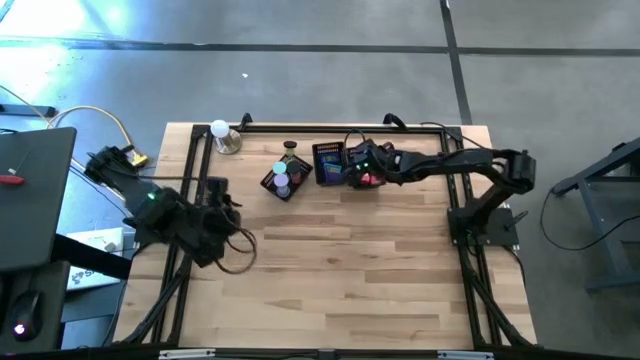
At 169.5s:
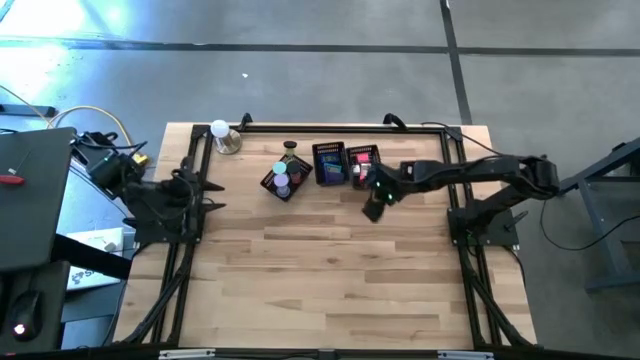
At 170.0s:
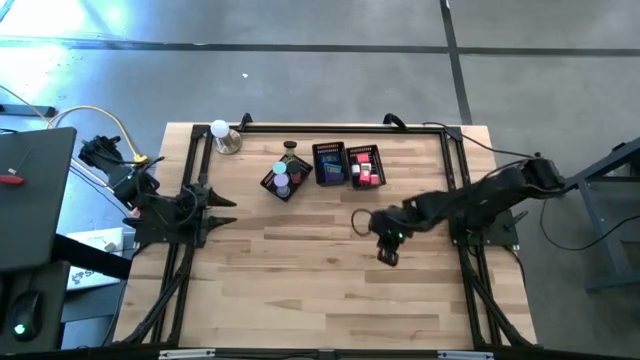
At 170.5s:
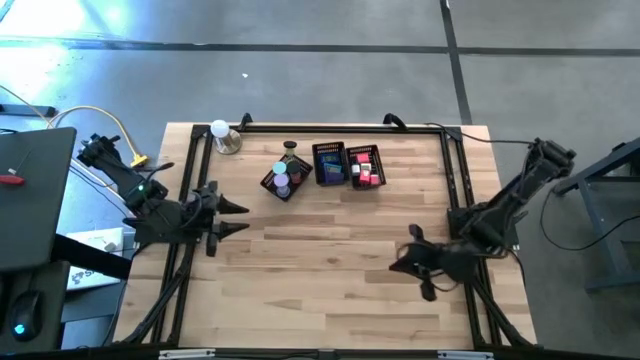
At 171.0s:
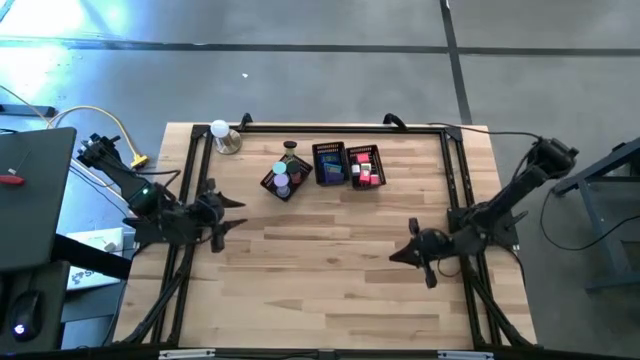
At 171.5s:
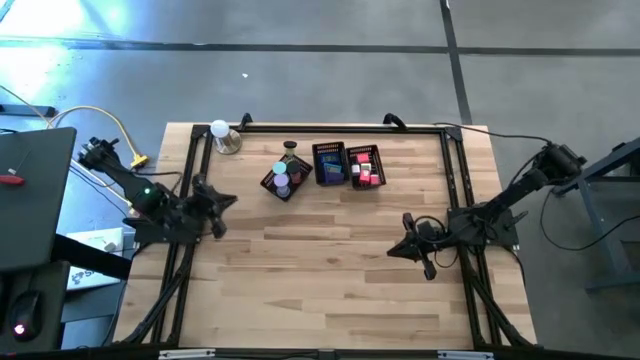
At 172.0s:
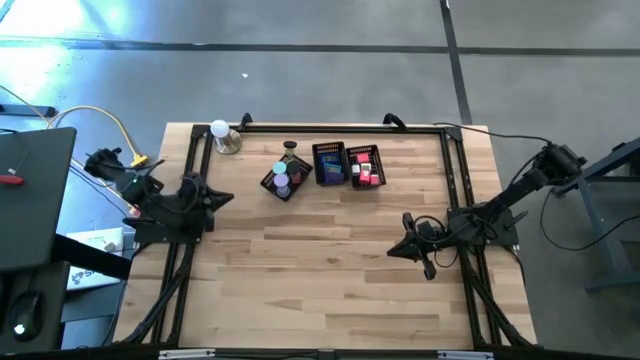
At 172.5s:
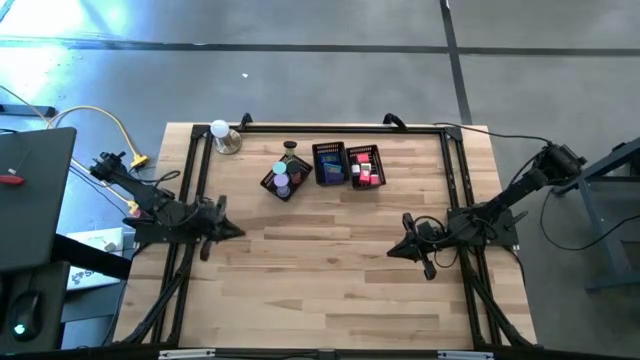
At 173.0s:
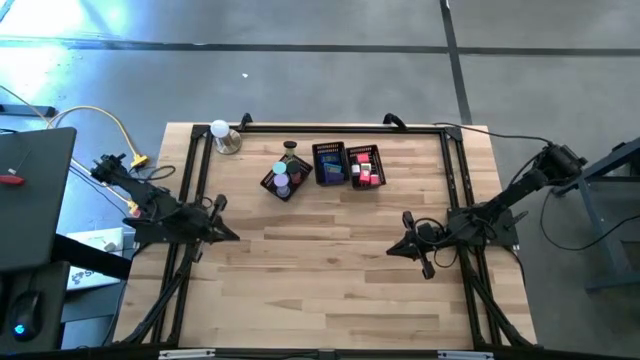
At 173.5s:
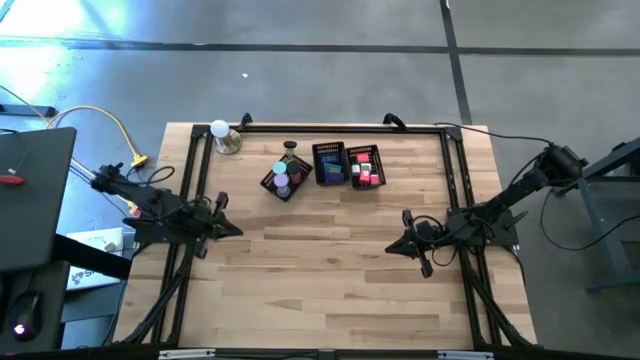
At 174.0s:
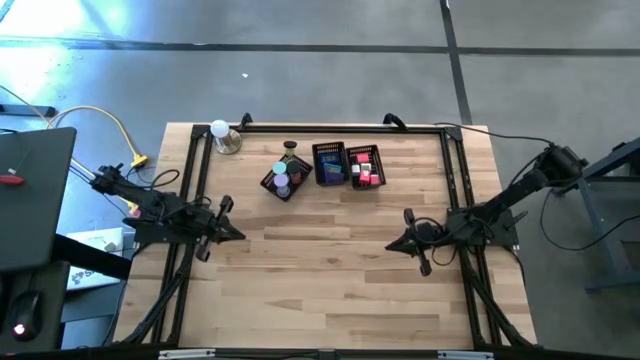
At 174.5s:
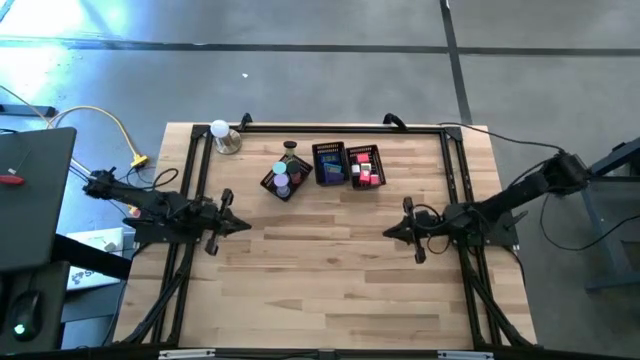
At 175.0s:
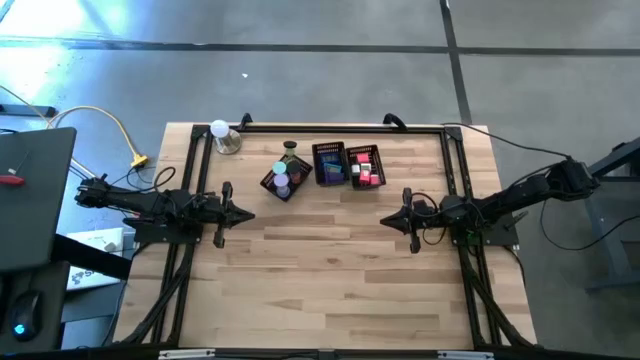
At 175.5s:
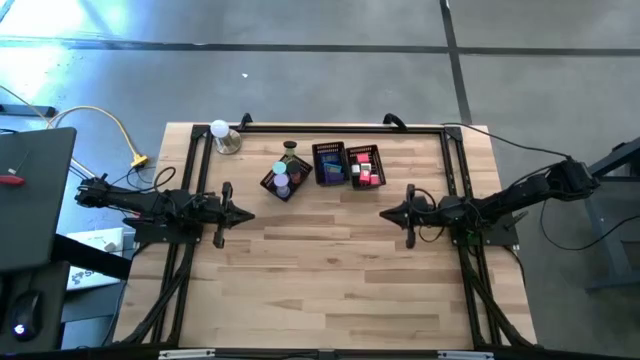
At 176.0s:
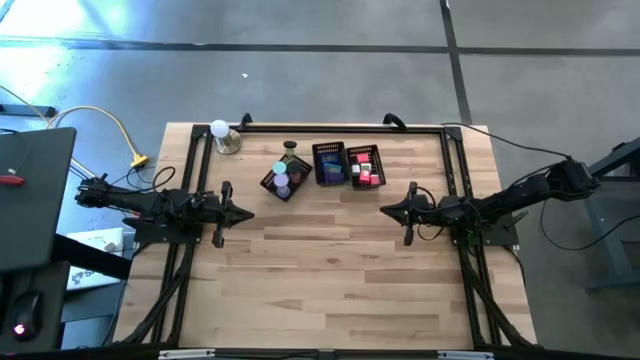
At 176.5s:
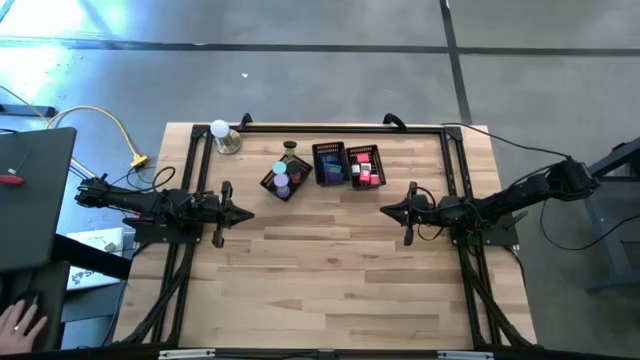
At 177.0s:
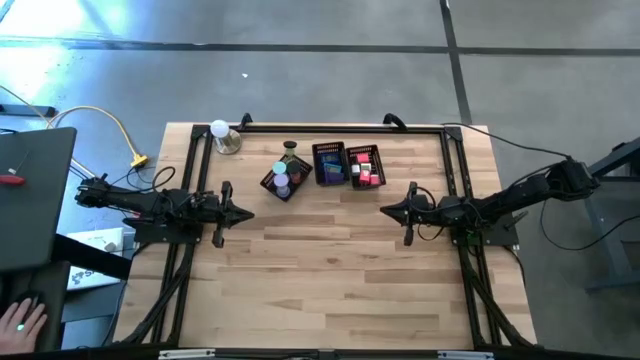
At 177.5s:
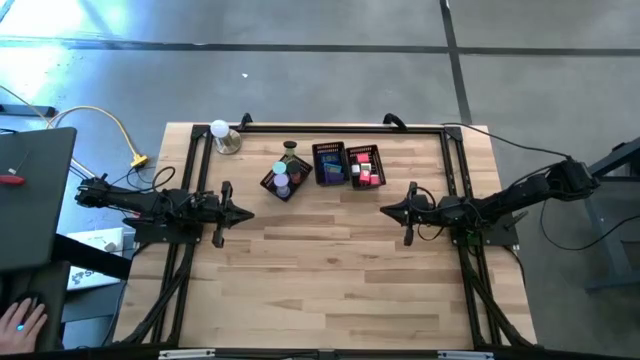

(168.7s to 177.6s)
Task: Pick & Place Office items
Return to Home Position

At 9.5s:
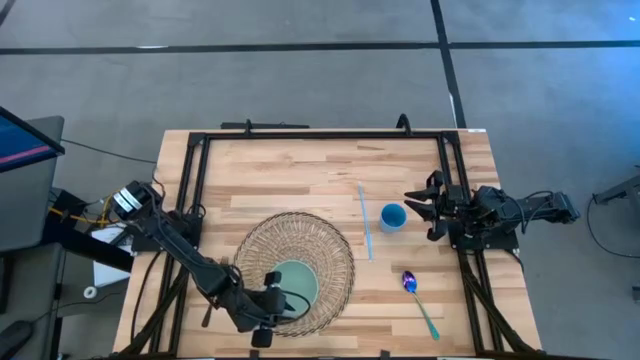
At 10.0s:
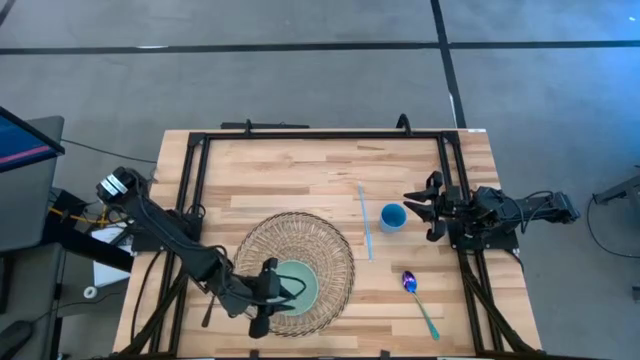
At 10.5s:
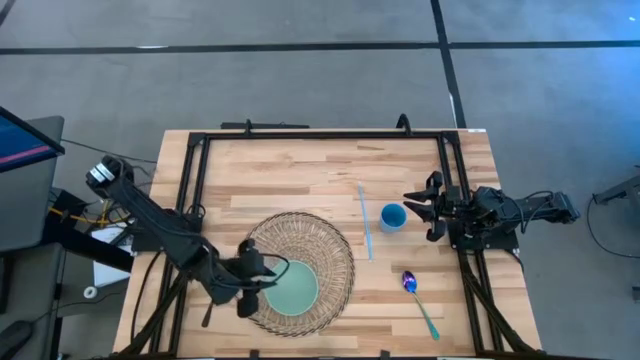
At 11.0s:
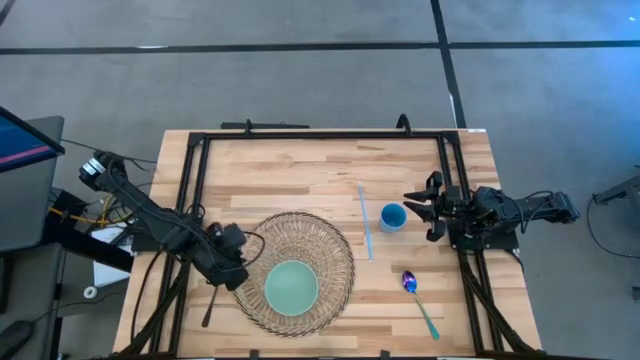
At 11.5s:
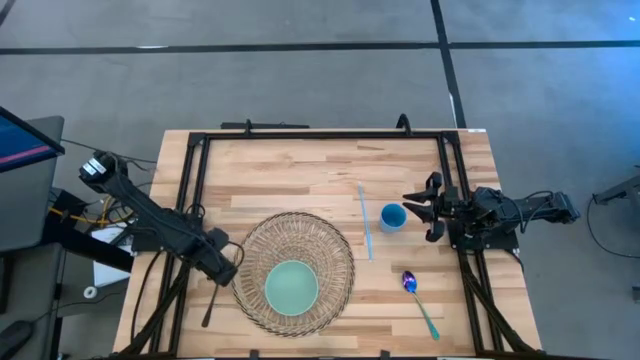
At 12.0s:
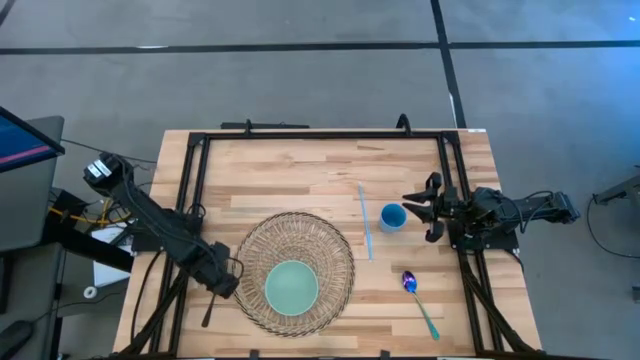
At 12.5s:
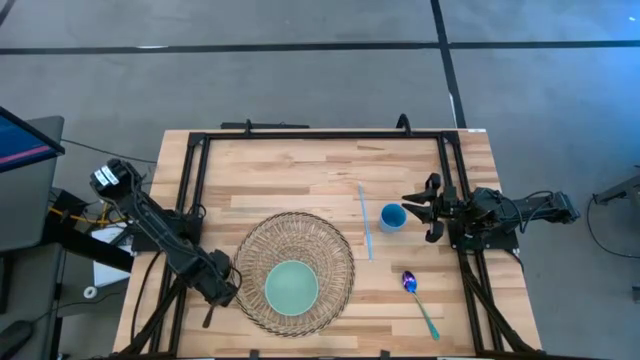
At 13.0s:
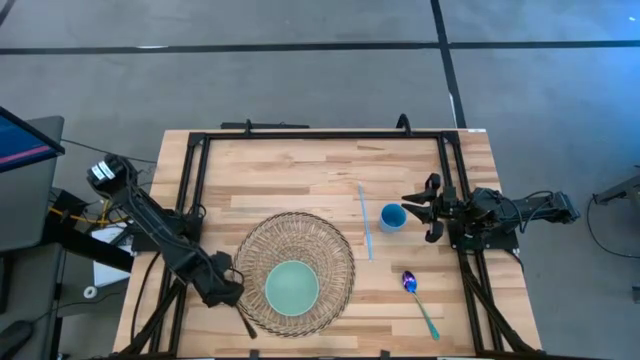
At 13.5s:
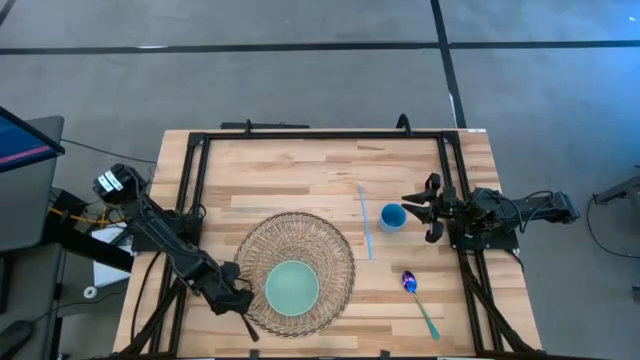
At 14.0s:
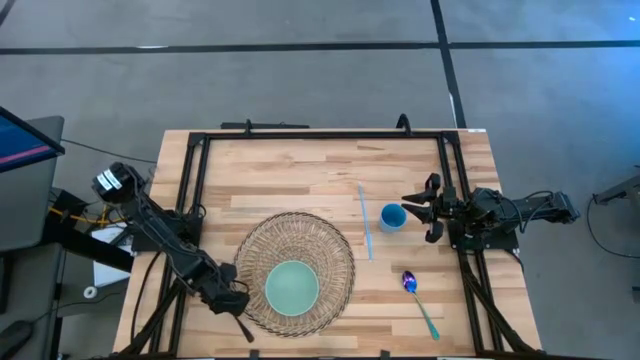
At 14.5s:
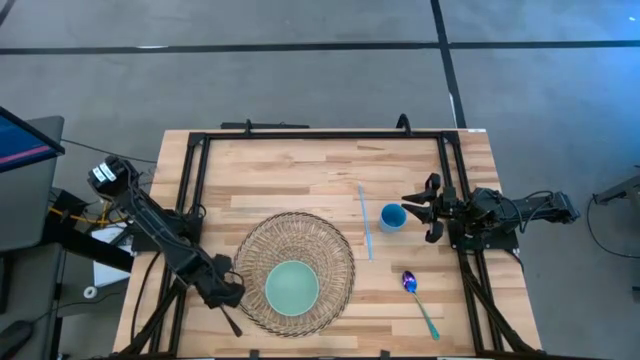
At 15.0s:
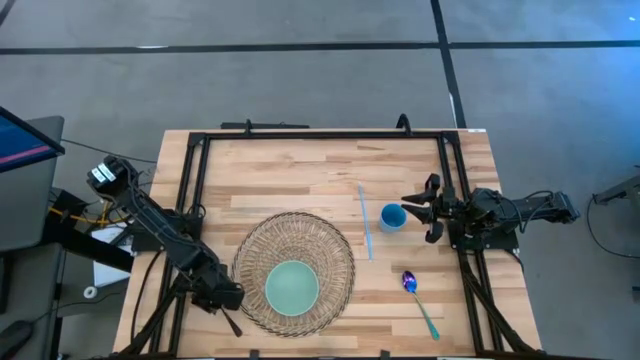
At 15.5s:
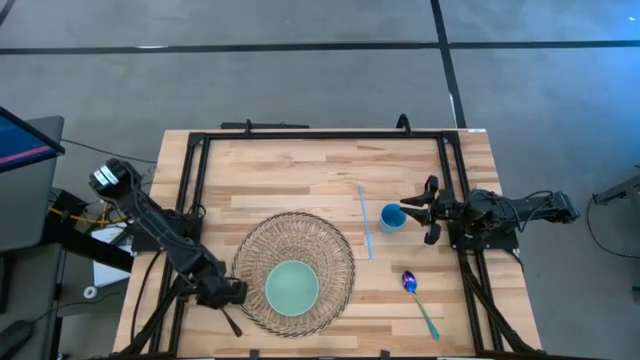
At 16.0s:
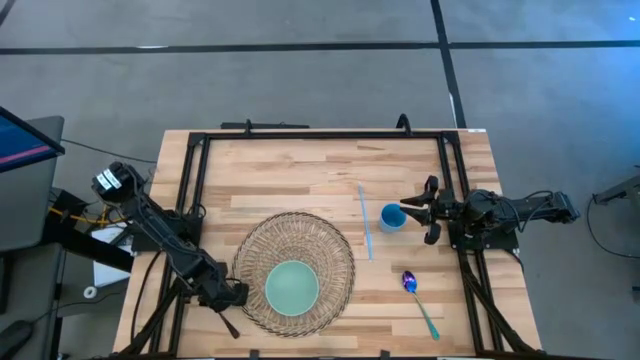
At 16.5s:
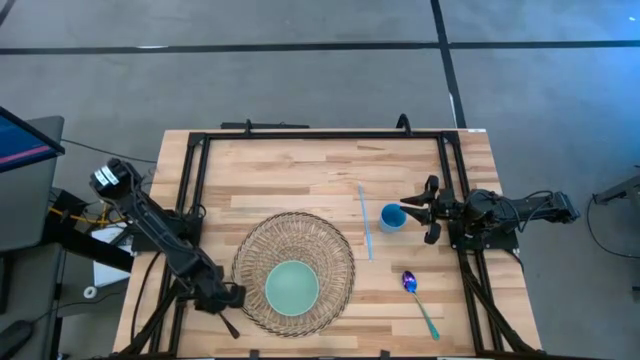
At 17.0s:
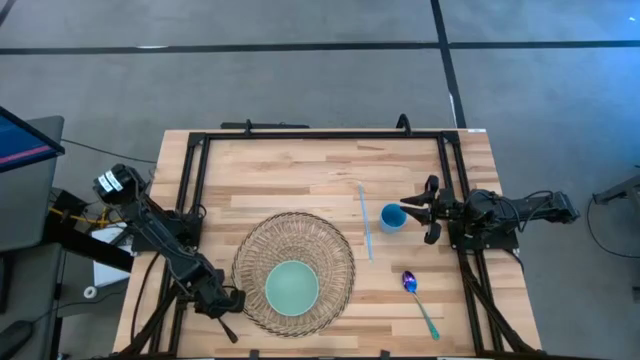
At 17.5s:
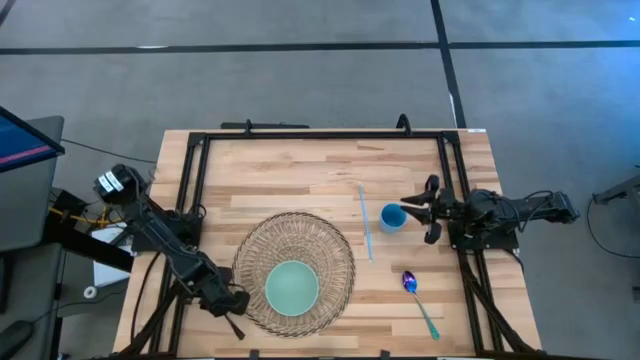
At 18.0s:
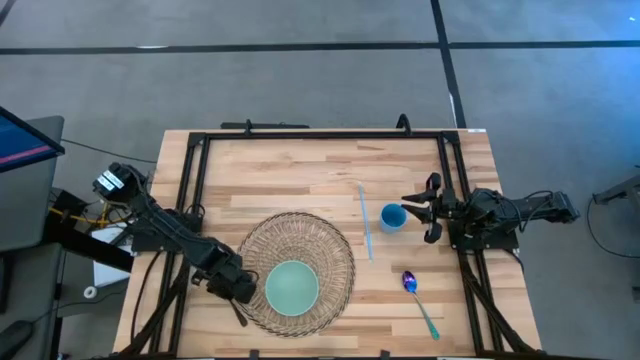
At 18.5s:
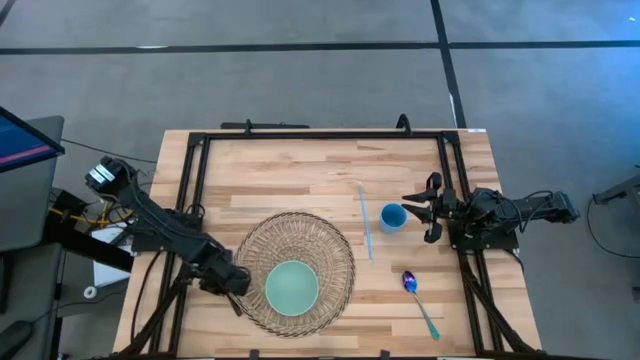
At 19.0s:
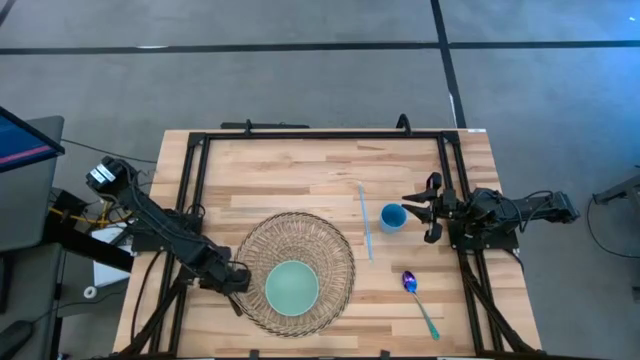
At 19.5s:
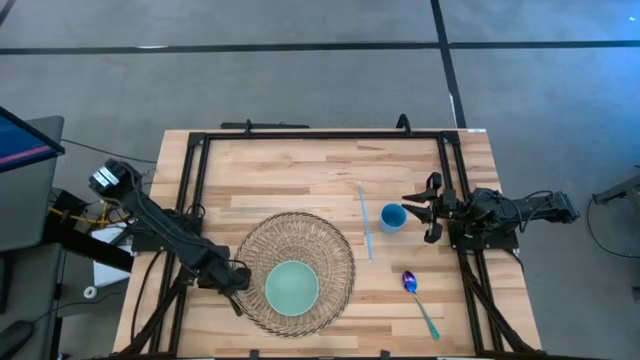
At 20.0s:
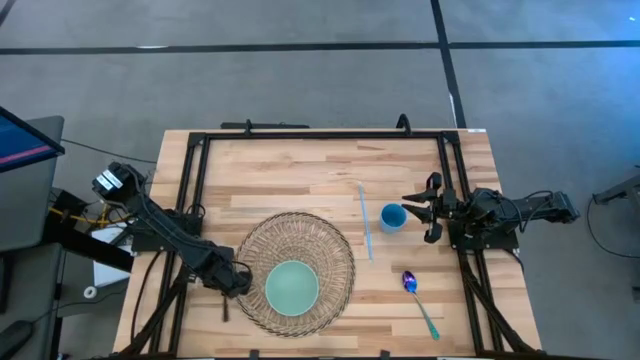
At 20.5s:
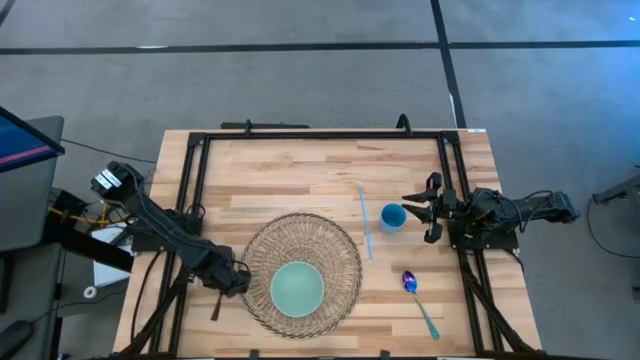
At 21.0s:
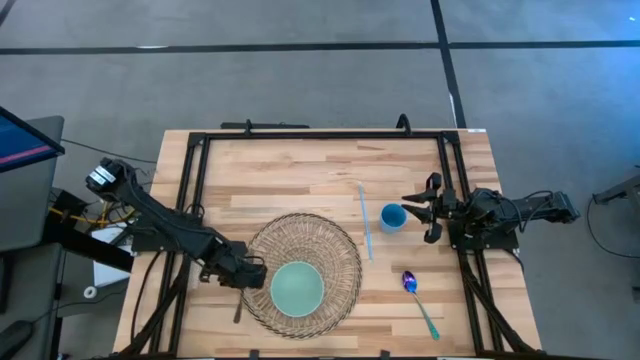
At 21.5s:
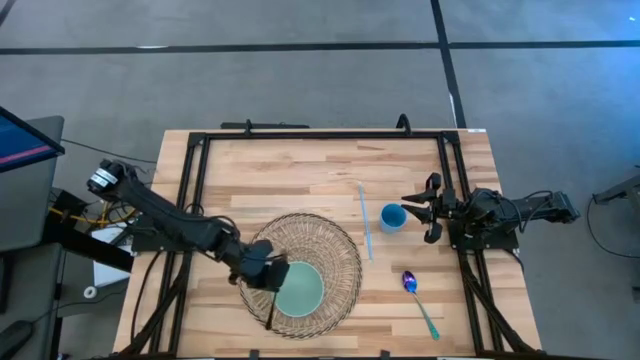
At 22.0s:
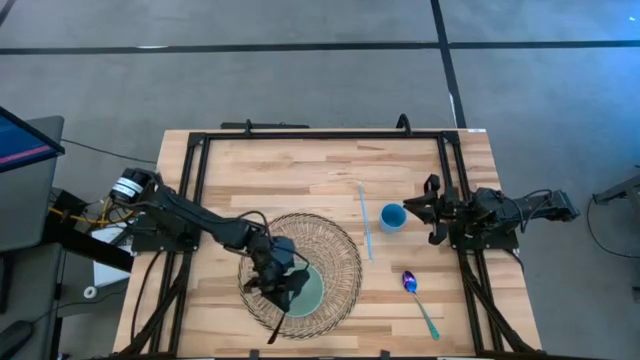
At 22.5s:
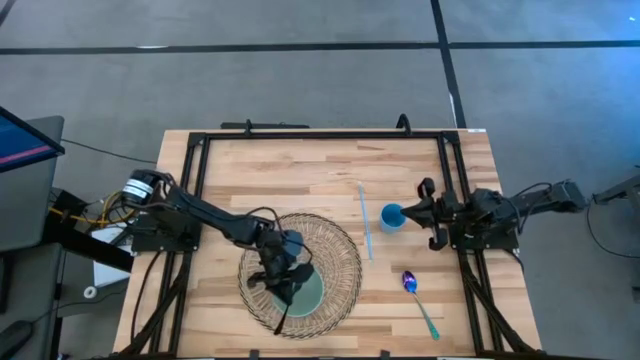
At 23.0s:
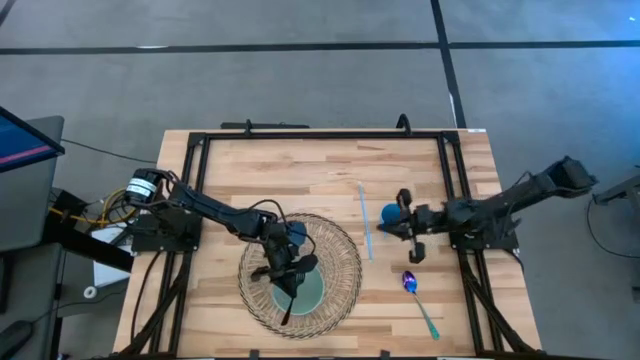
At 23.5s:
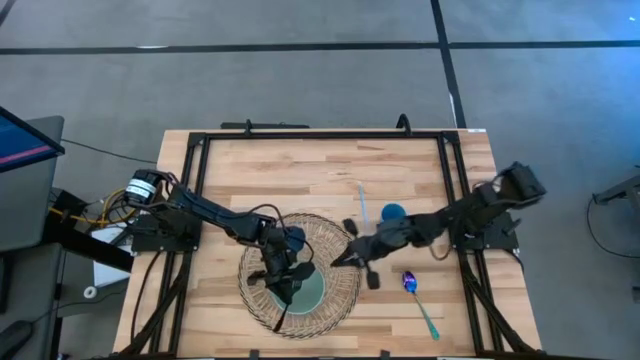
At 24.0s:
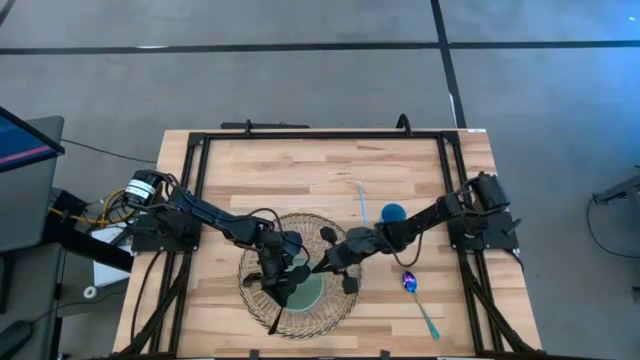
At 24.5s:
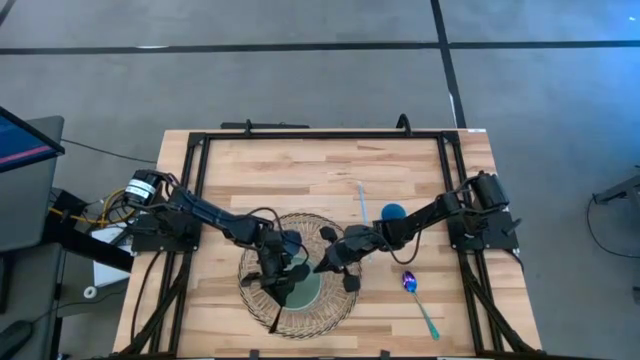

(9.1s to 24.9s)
Task: Pick & Place Utensil
Put the black fork into the green bowl on the brown mat
